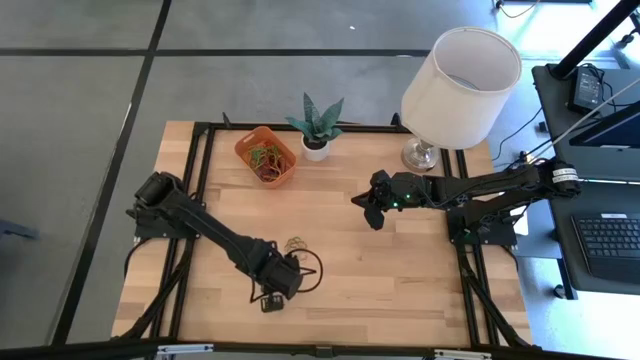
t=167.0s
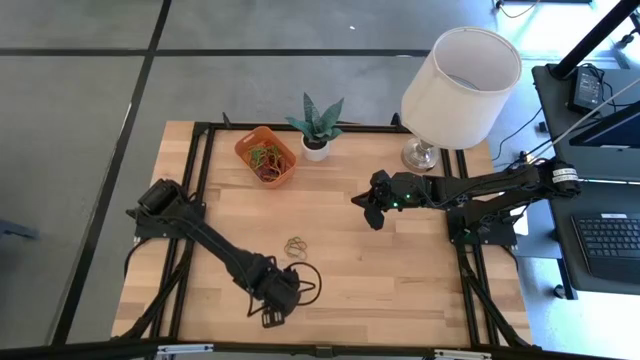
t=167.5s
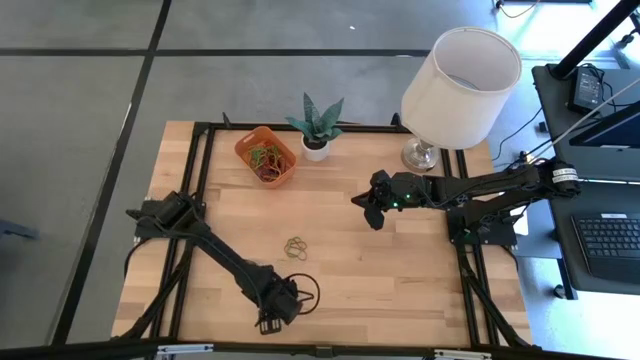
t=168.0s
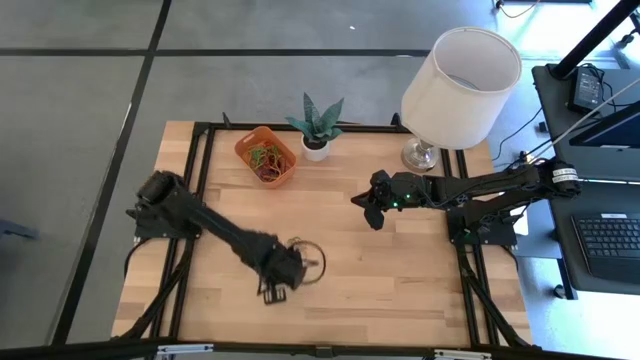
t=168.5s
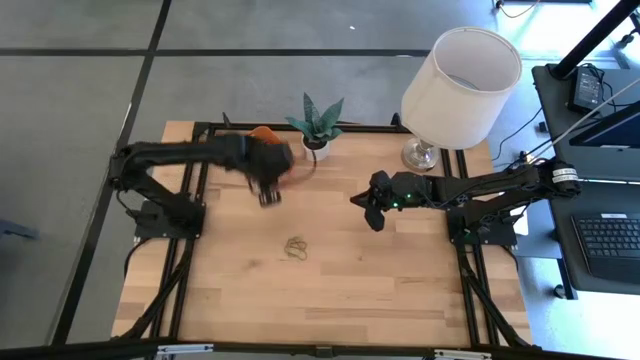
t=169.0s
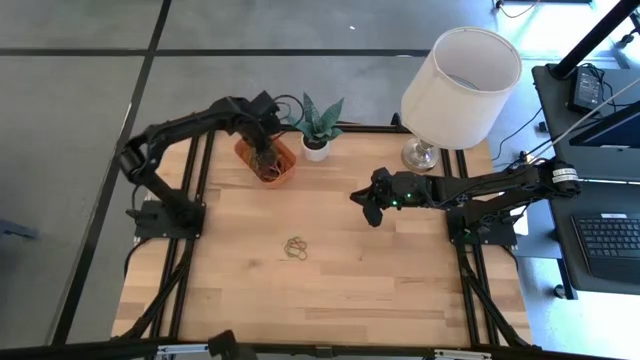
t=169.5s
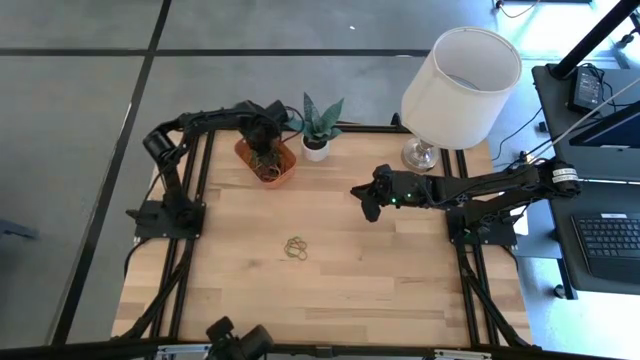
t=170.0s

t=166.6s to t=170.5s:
Task: Pick and place rubber bands into bin
Put the black rubber band into the orange bin

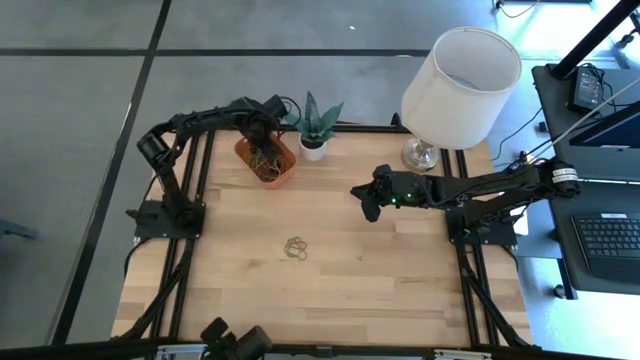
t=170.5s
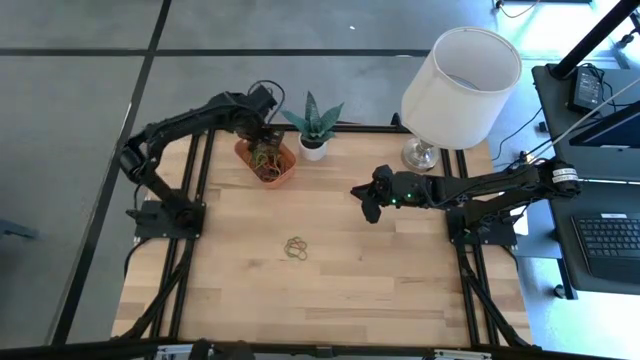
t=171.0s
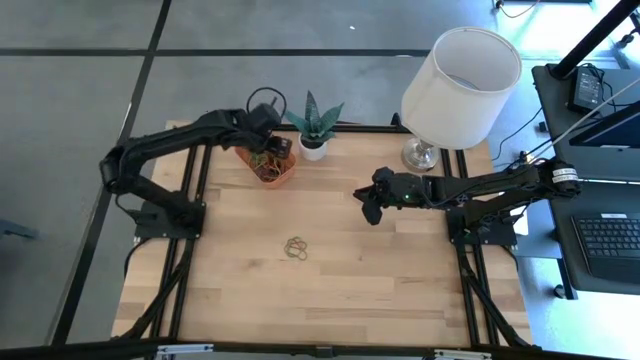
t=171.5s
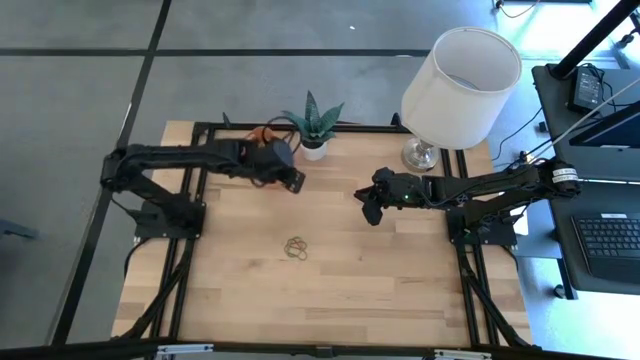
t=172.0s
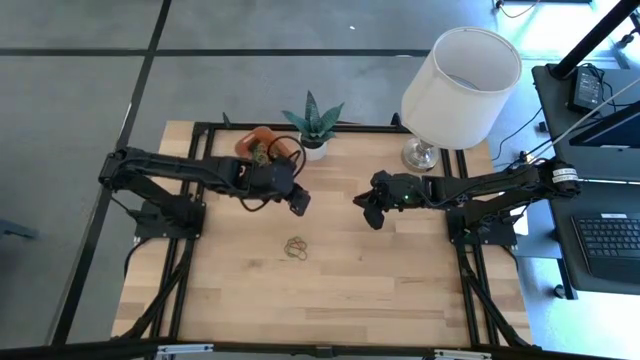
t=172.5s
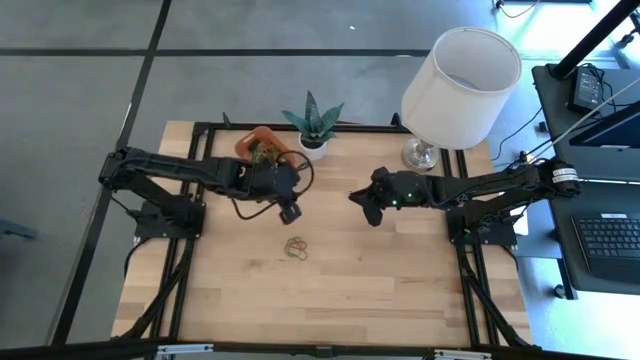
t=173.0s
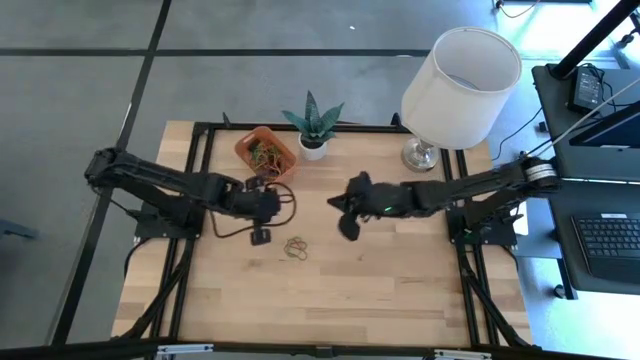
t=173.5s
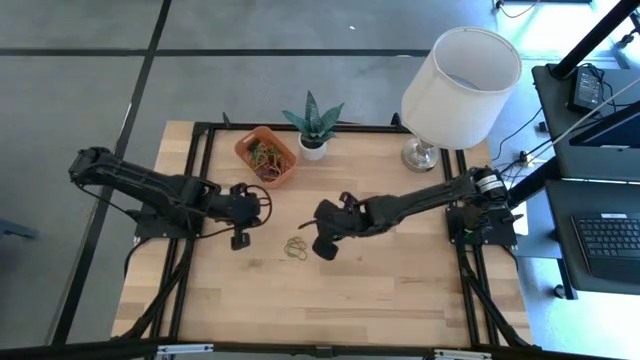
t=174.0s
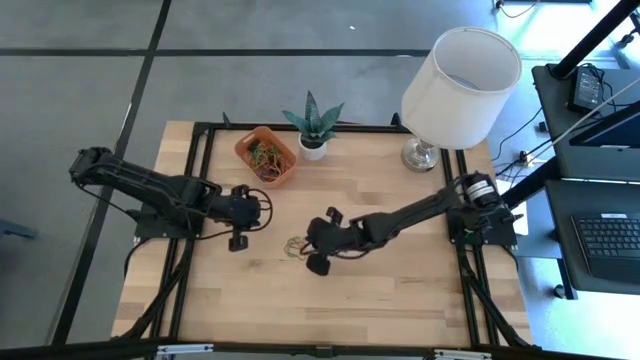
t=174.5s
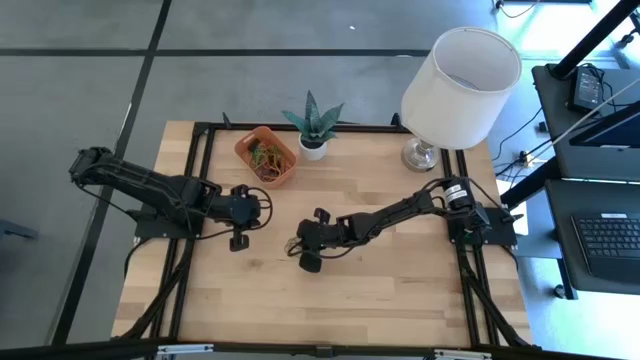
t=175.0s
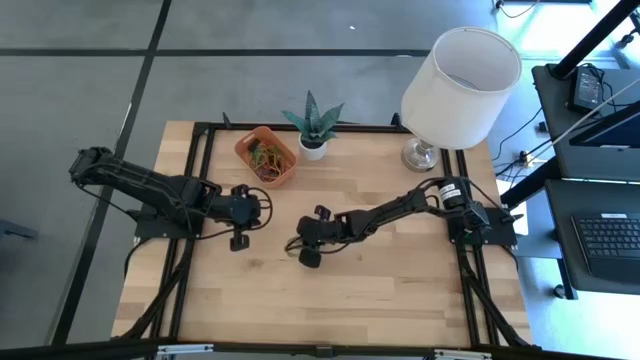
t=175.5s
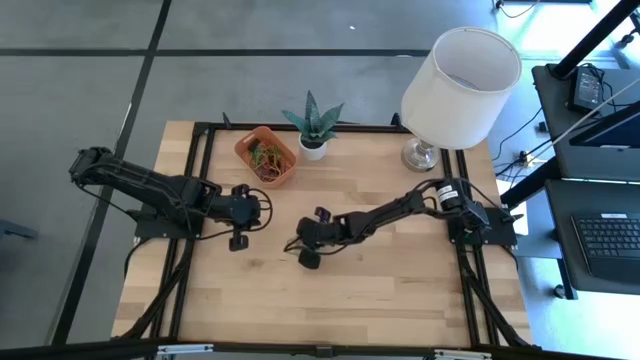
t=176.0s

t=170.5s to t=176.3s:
Put the green rubber band into the orange bin

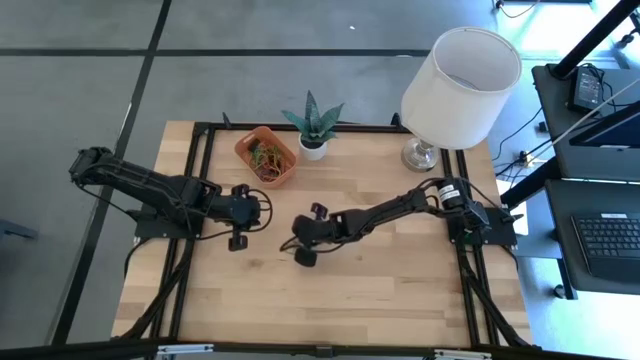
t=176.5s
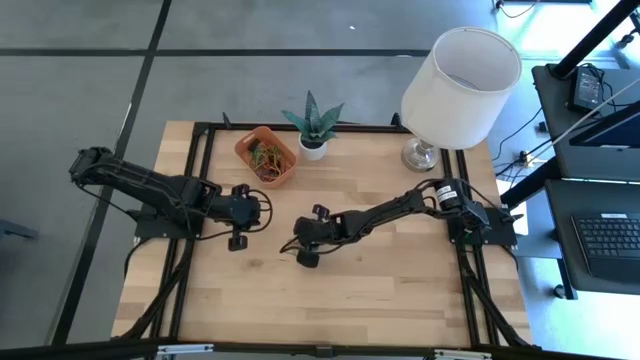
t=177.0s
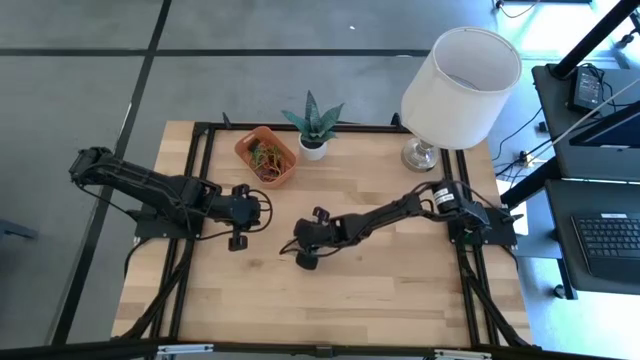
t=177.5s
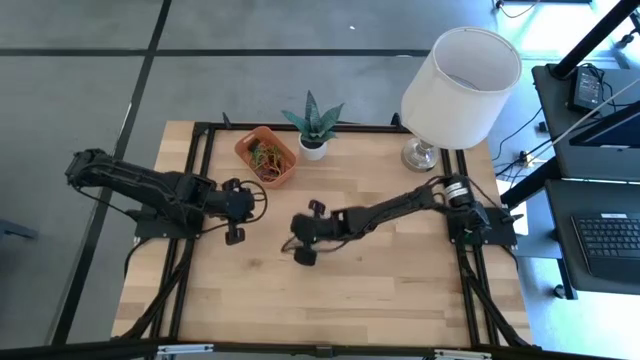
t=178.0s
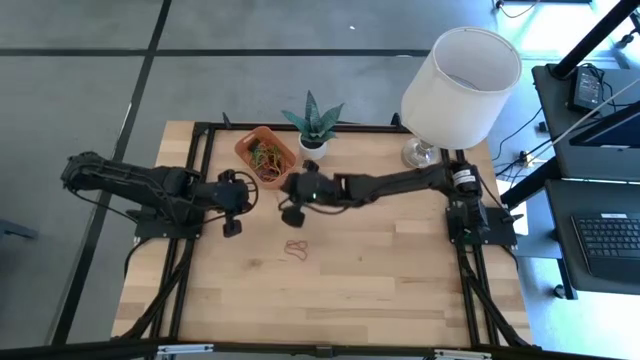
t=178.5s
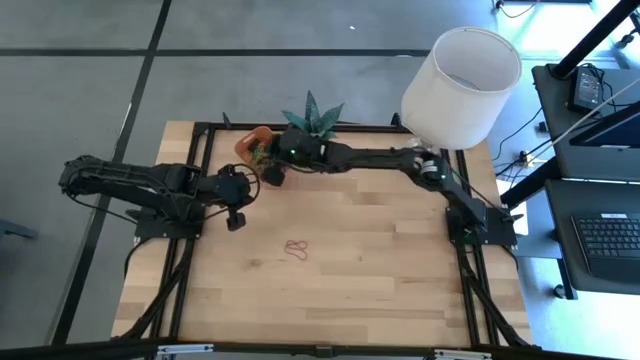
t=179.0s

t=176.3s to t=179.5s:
Put the green rubber band into the orange bin

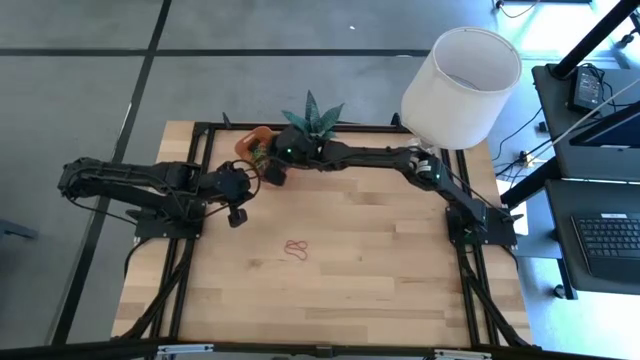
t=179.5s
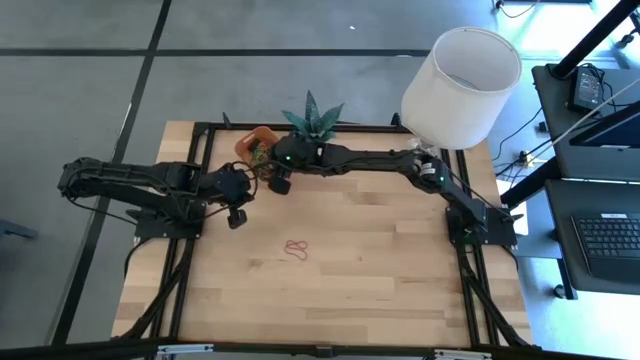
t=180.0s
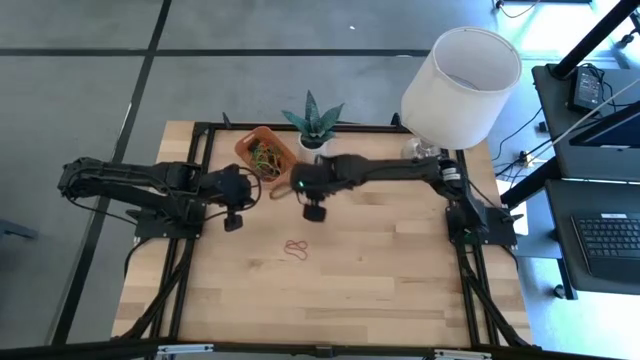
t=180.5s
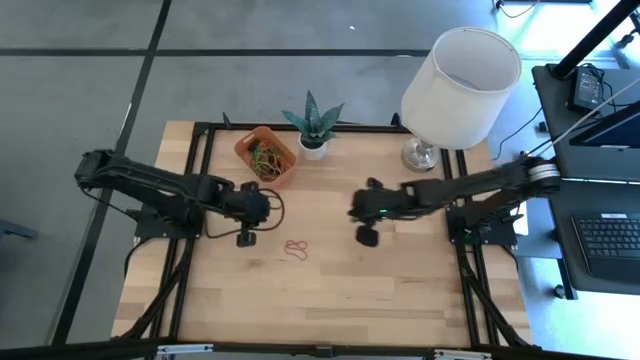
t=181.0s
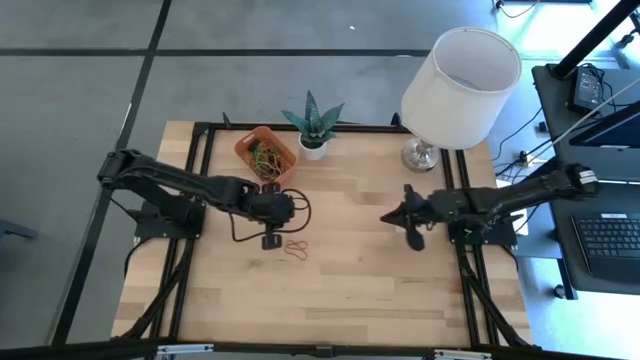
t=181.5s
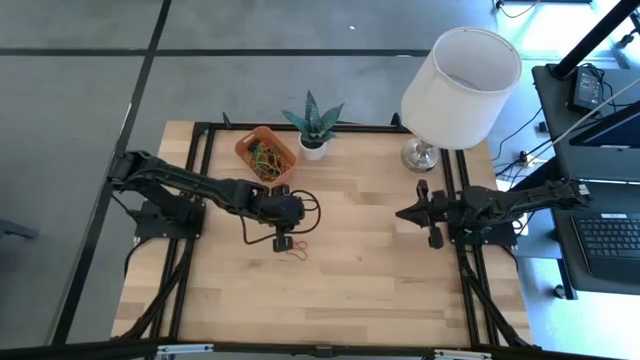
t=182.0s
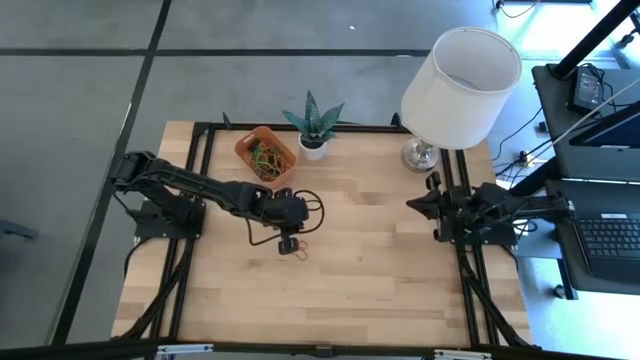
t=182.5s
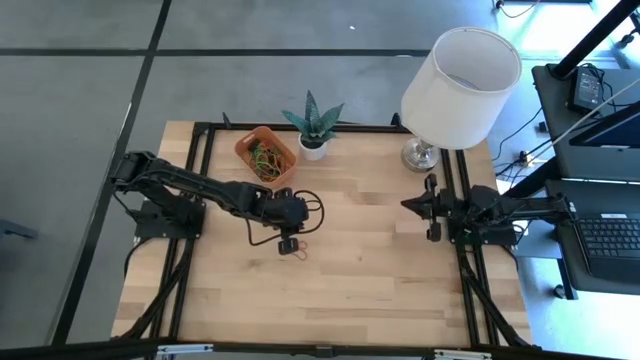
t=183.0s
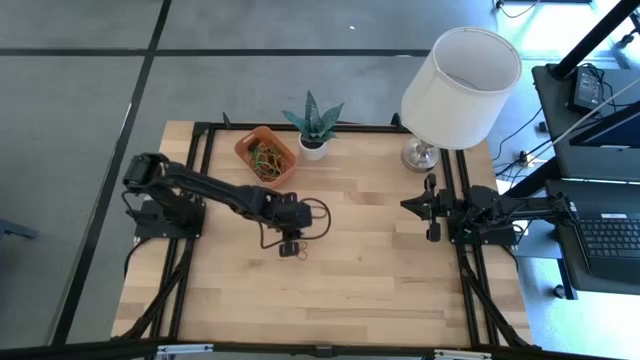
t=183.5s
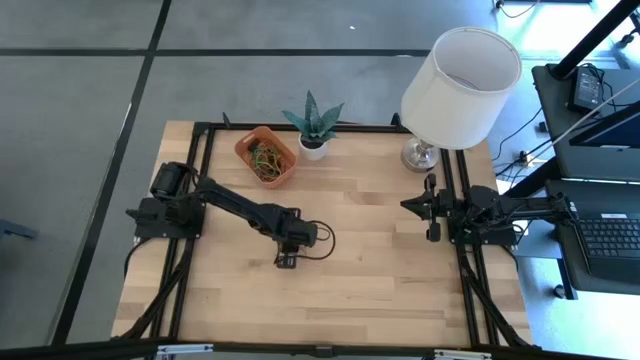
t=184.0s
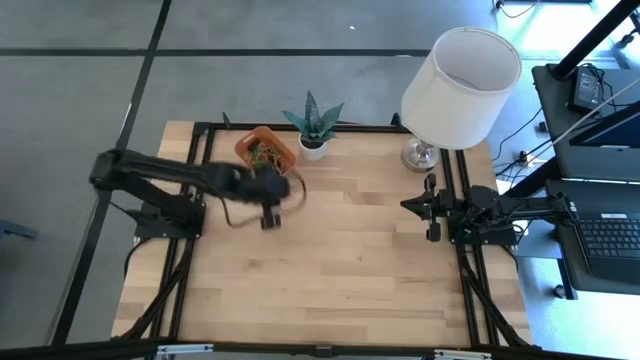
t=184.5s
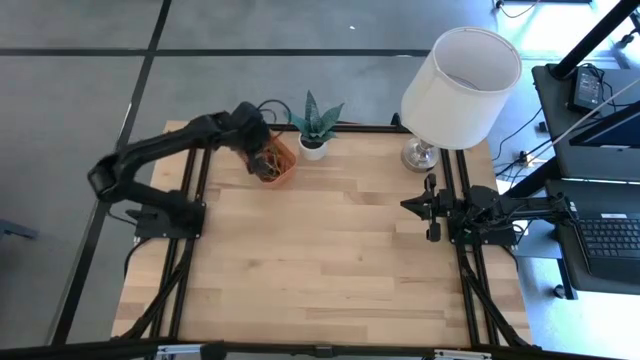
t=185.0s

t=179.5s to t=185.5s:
Put the red rubber band into the orange bin

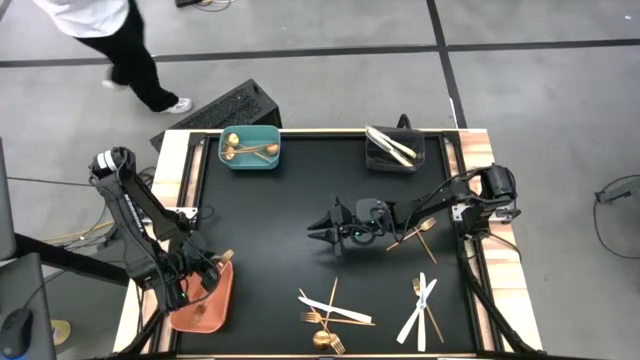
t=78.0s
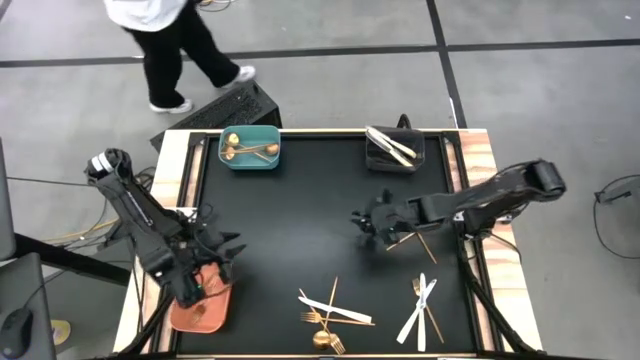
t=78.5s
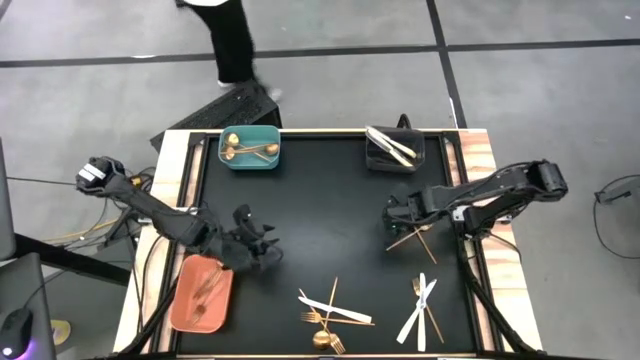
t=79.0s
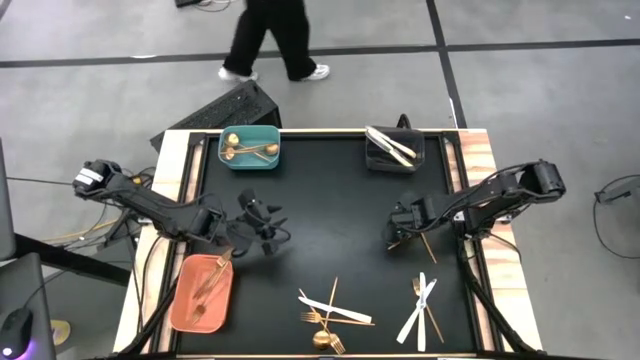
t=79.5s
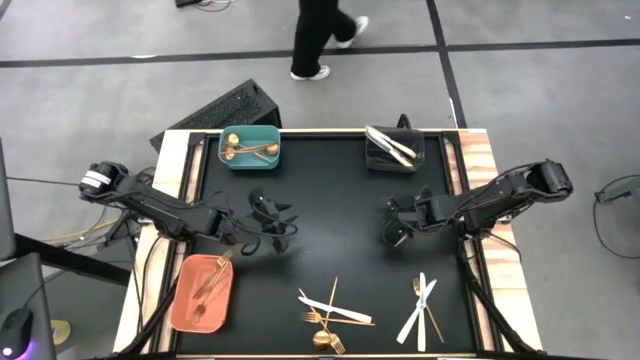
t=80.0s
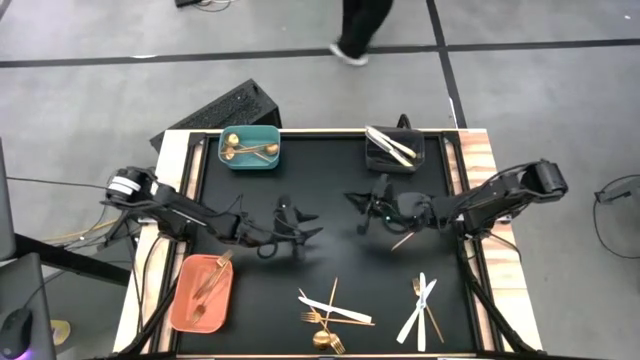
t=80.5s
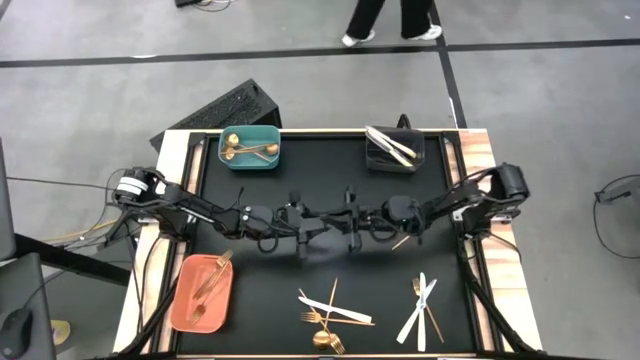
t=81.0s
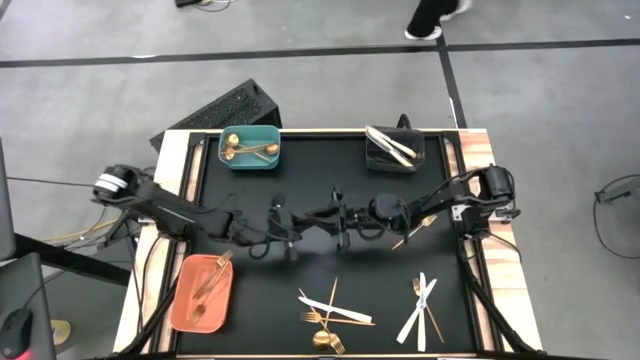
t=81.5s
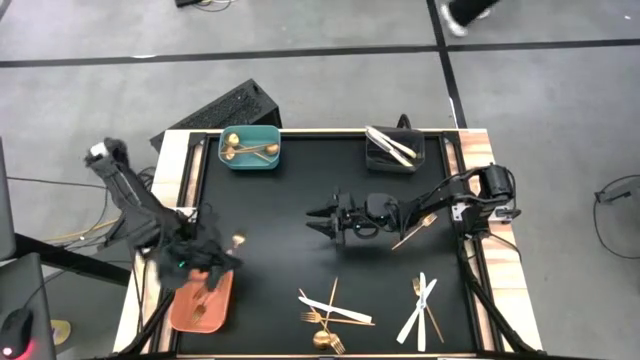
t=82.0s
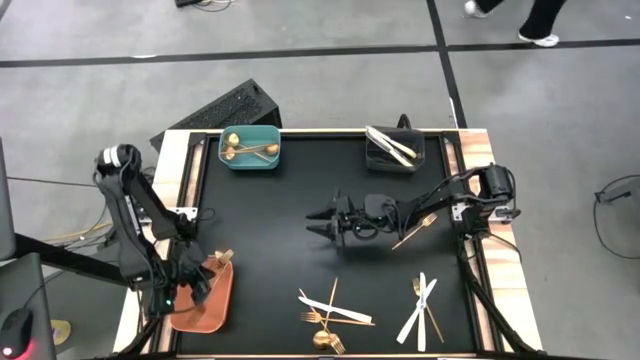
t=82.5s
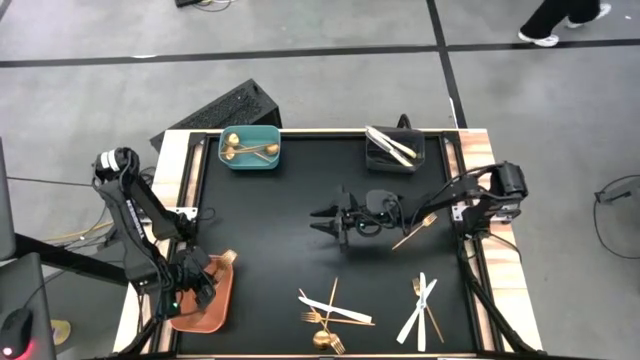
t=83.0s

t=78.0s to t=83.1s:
Task: Sort silverware by color (type)
Put the gold fork into the orange bin
